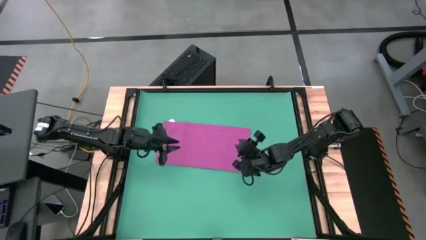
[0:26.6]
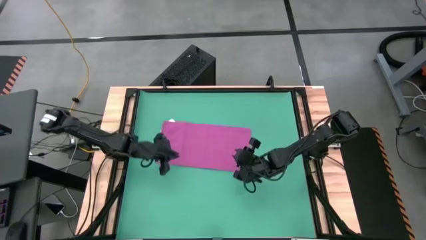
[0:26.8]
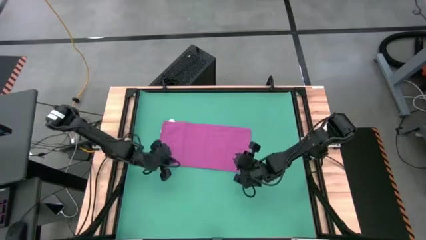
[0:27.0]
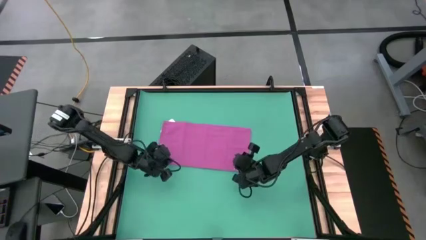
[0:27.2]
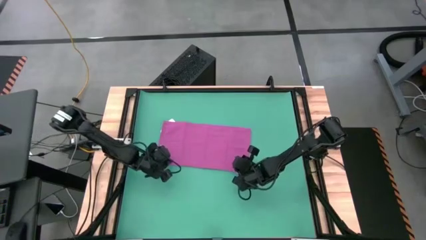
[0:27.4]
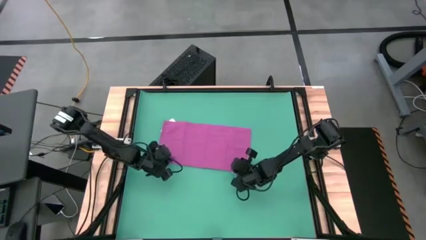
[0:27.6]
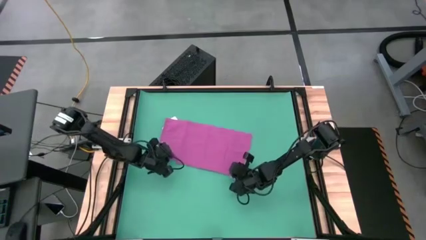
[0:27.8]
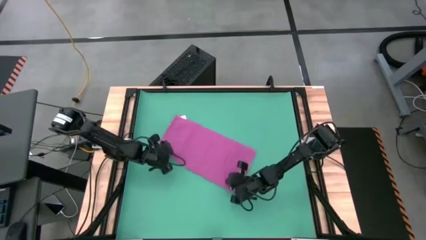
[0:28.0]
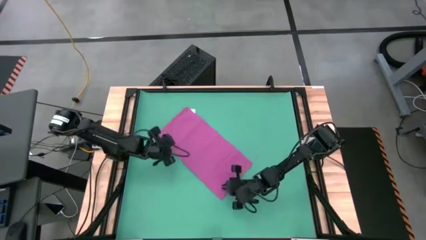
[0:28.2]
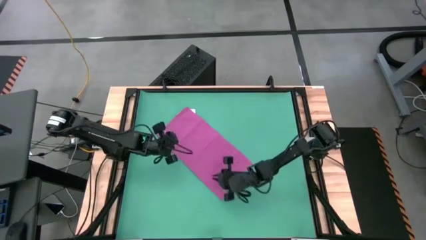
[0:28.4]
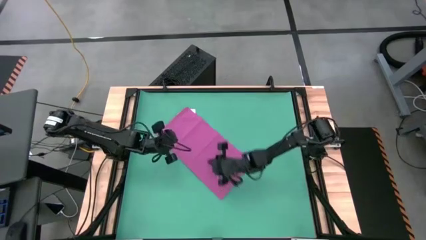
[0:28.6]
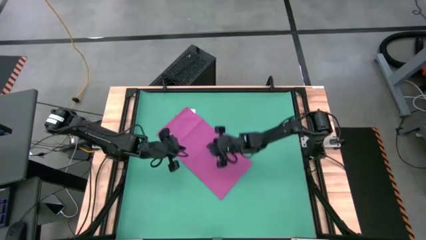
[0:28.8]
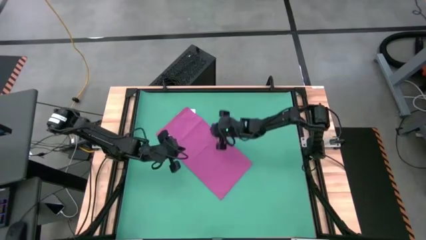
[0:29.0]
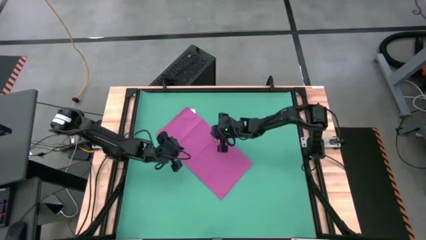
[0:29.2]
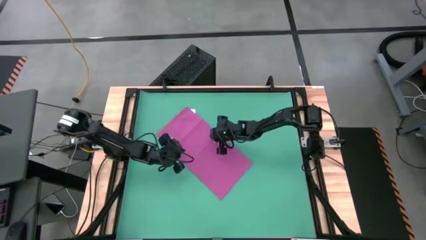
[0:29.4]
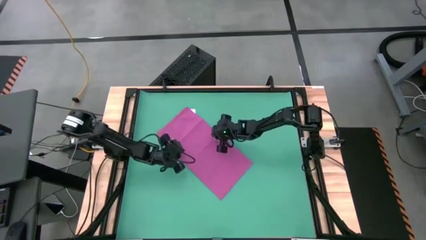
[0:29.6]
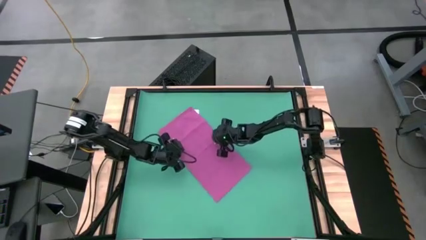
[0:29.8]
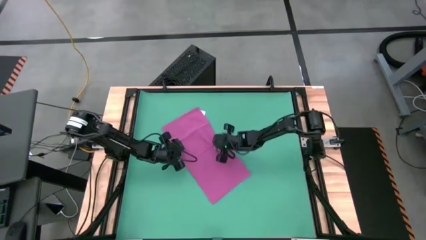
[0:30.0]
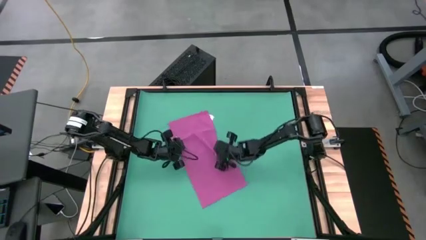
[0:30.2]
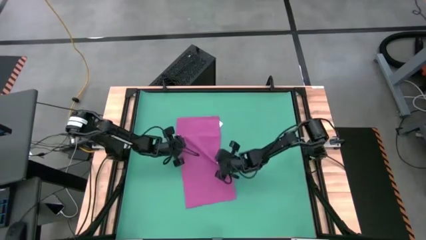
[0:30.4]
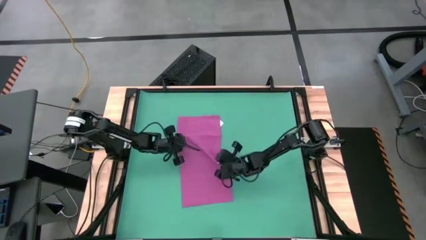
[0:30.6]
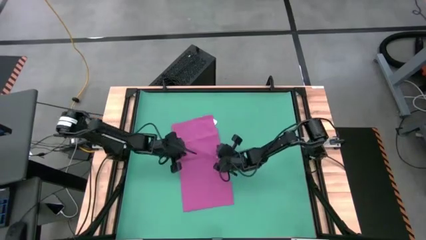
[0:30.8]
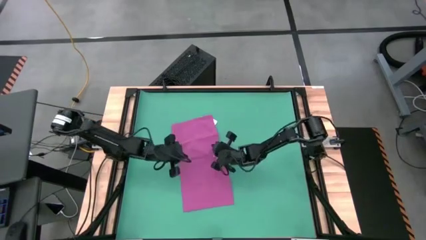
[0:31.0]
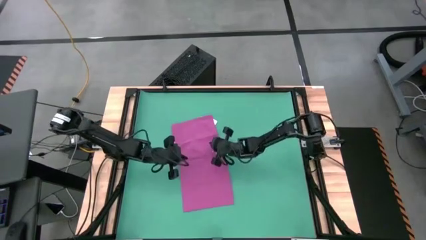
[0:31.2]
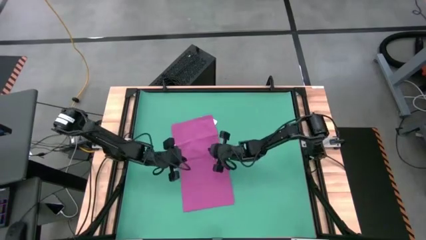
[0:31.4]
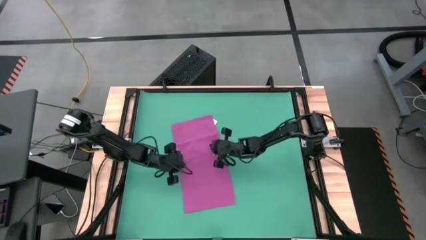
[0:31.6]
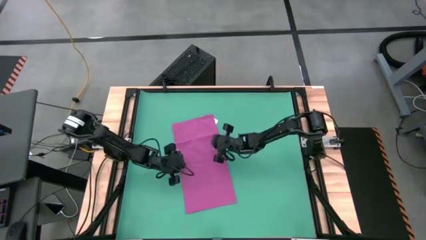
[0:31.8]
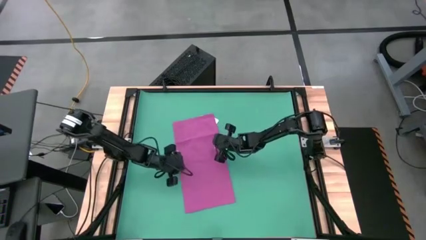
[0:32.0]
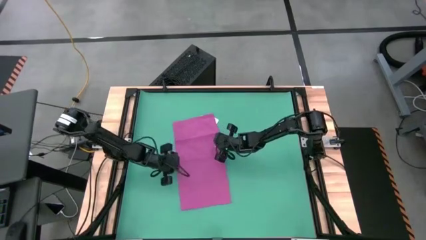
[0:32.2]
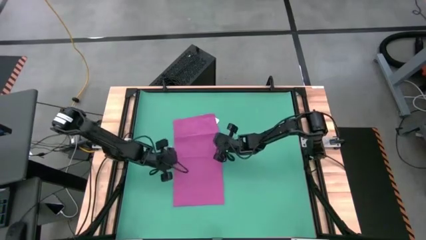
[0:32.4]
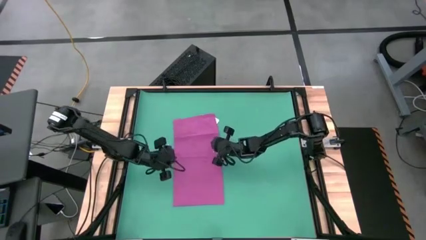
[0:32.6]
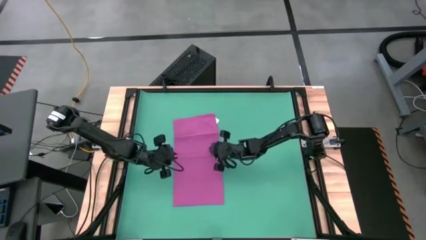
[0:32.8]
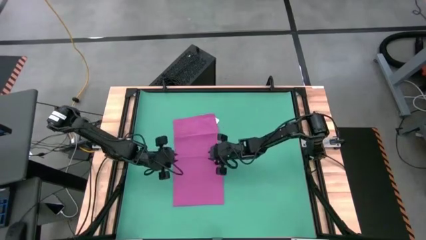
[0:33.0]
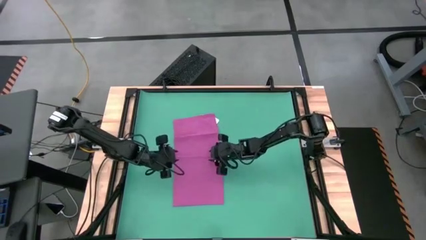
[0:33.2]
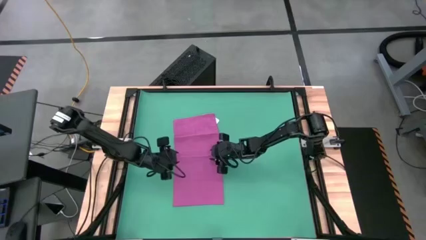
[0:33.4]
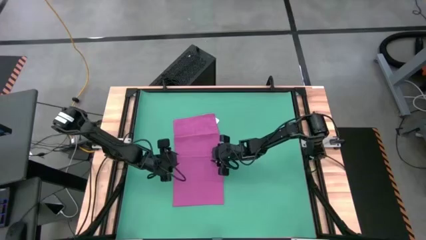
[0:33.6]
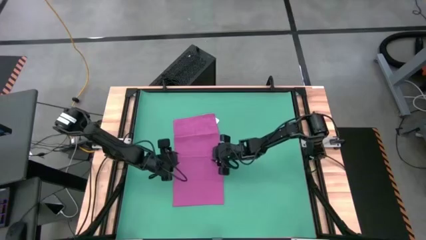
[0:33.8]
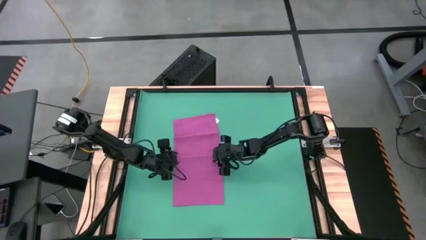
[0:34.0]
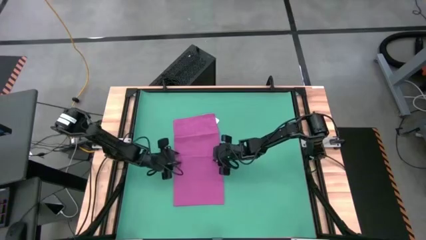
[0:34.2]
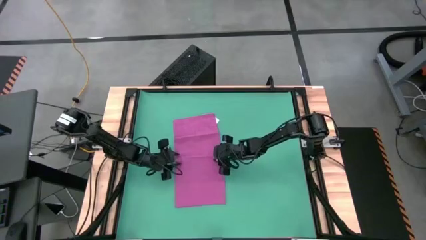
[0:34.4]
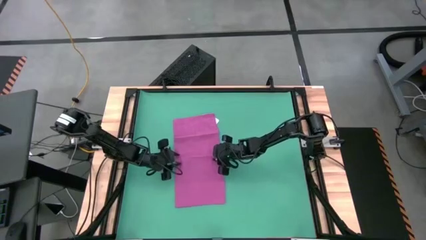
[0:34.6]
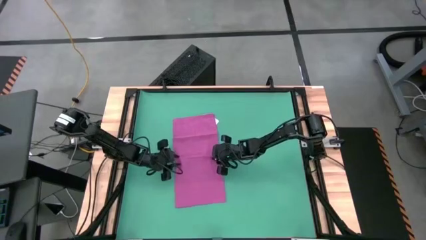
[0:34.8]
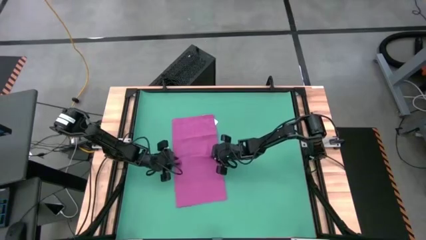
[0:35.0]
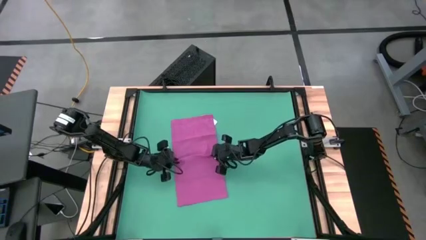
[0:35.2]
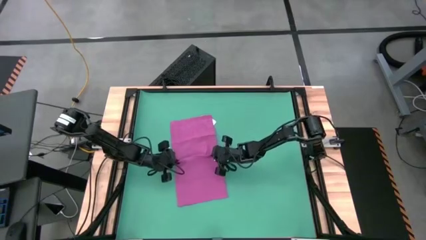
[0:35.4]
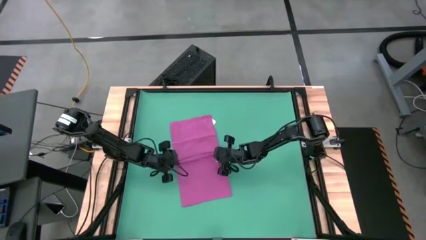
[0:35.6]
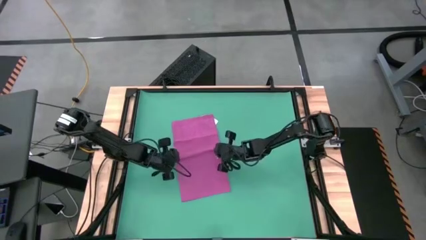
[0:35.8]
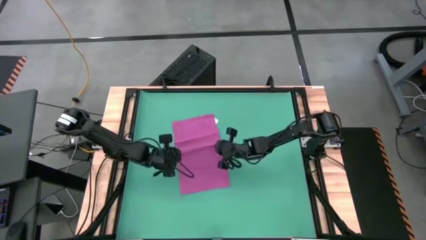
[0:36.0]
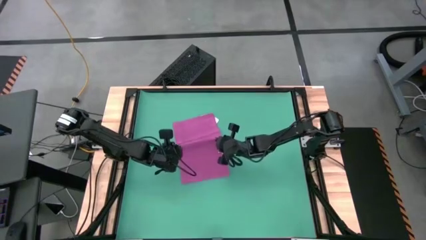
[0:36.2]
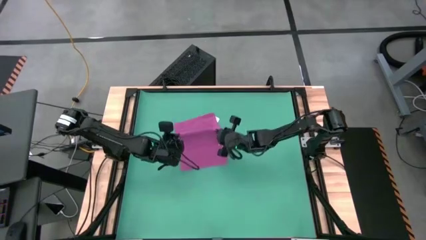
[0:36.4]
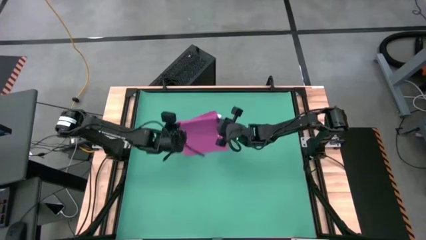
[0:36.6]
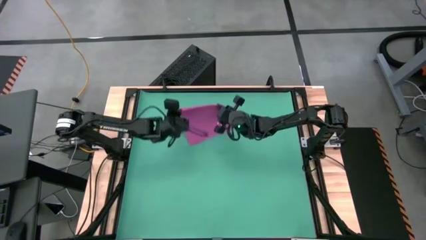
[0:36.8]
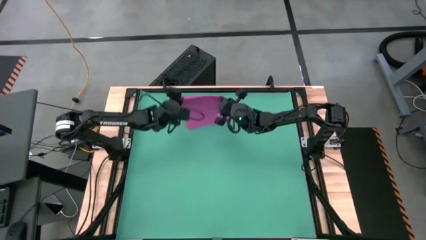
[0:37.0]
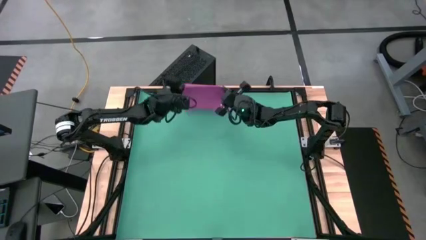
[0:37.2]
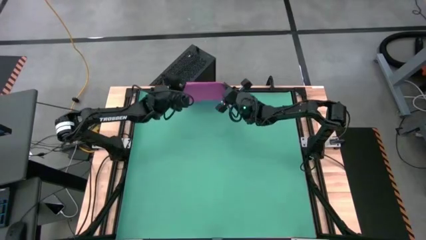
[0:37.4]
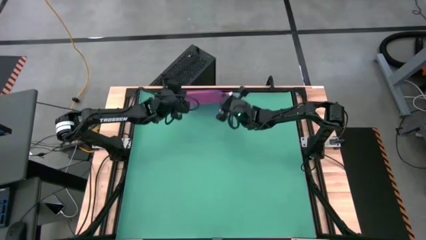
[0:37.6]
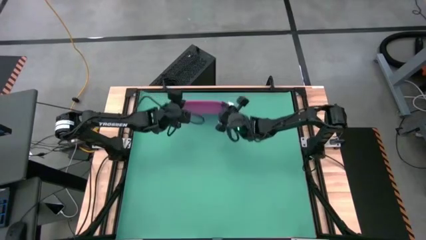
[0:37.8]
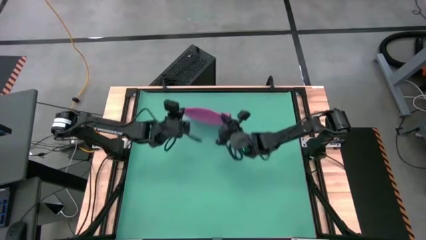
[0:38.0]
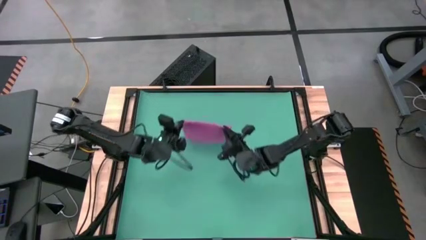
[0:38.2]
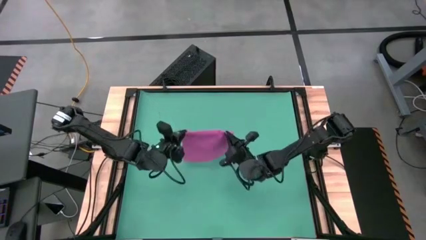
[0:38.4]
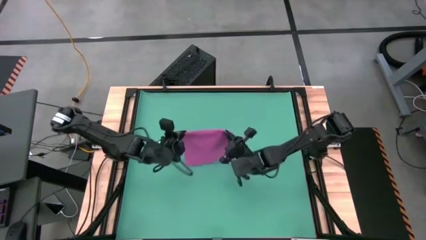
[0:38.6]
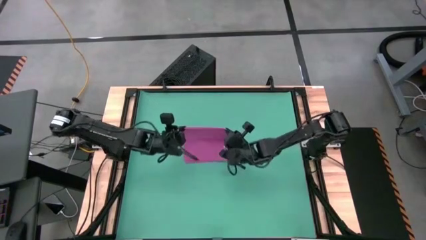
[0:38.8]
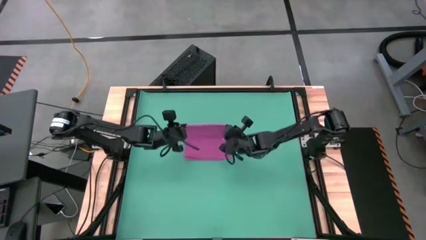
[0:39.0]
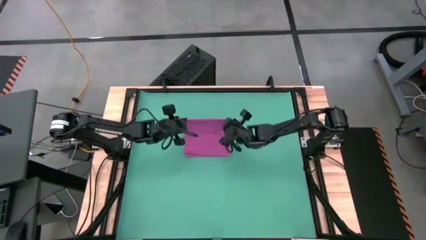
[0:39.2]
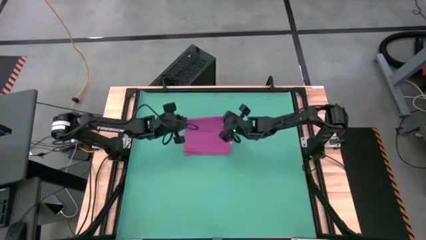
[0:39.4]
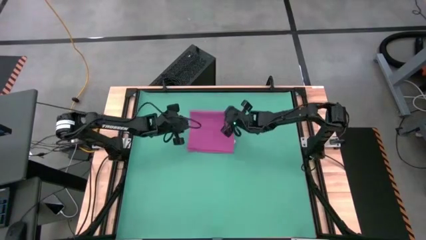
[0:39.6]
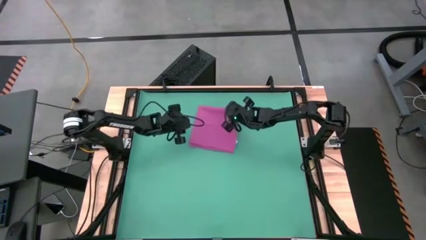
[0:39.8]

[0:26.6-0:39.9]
Task: Roll towel into tight, uniform cylinder
Roll the pink towel

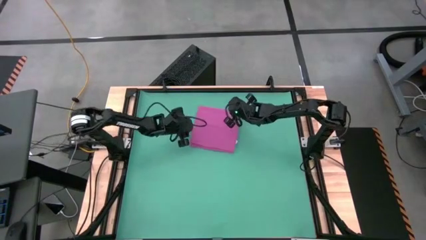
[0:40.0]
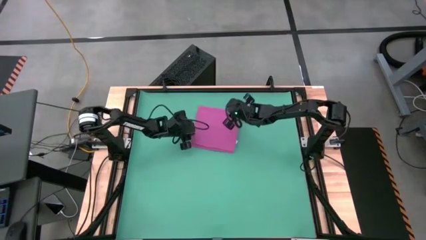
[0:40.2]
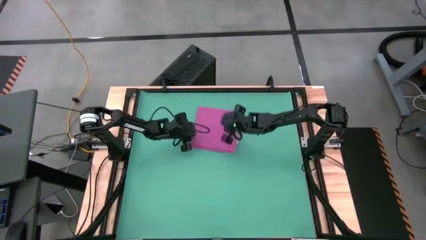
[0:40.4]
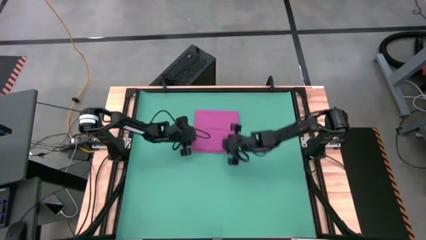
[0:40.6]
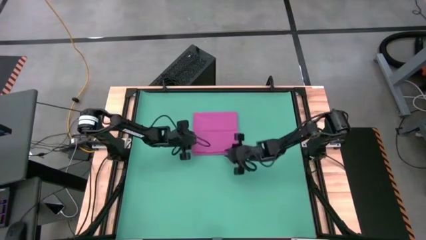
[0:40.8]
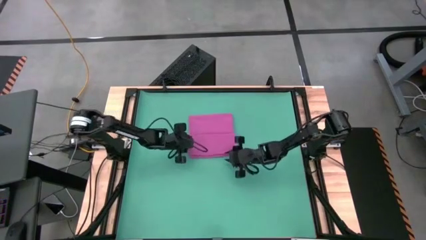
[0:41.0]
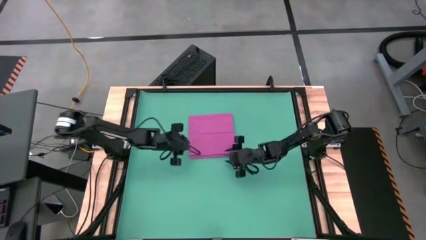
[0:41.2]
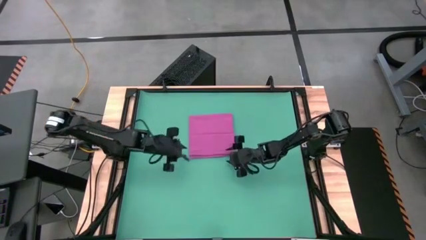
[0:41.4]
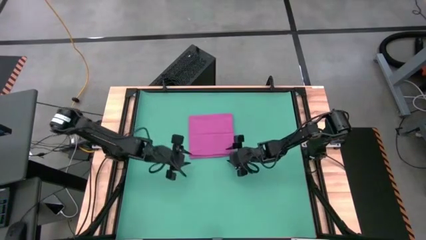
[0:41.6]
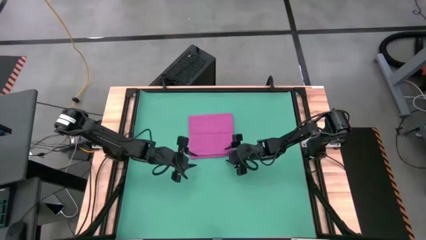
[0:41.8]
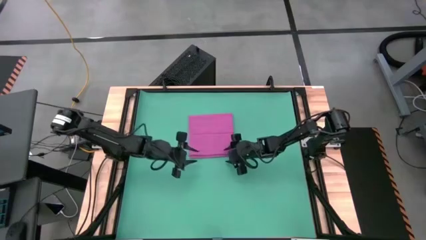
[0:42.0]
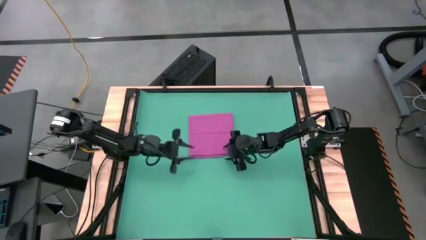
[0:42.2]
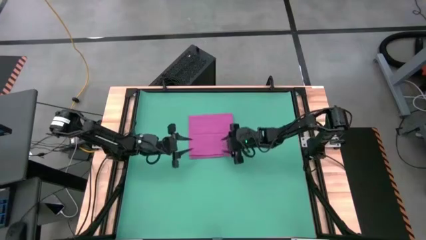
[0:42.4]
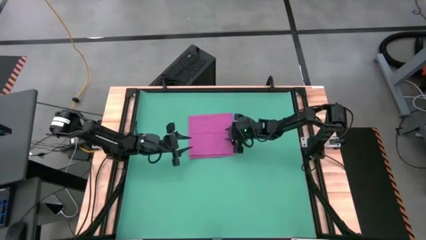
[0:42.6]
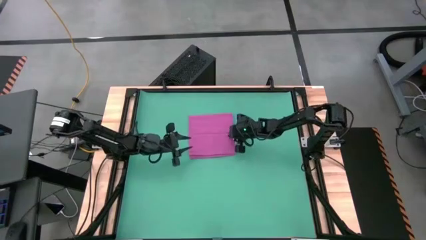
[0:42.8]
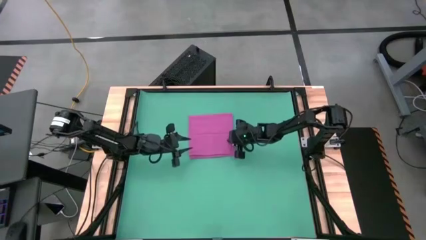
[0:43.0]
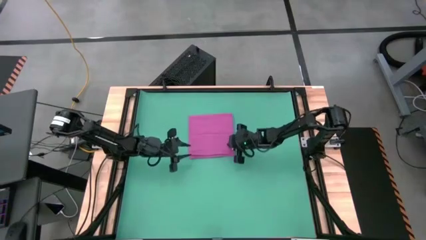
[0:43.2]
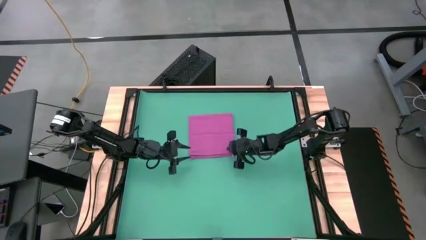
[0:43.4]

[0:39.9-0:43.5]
Roll the pink towel
